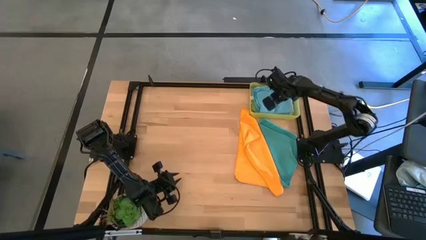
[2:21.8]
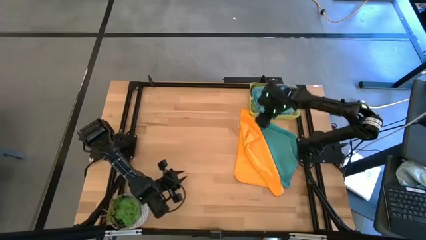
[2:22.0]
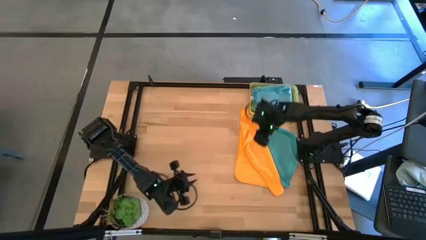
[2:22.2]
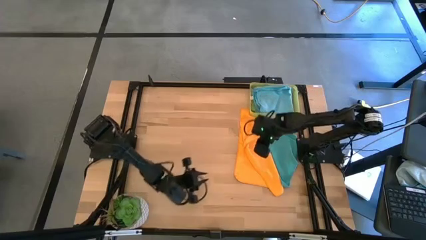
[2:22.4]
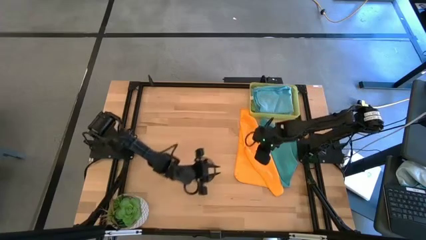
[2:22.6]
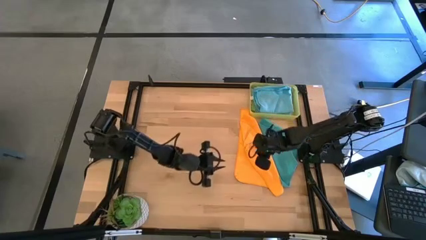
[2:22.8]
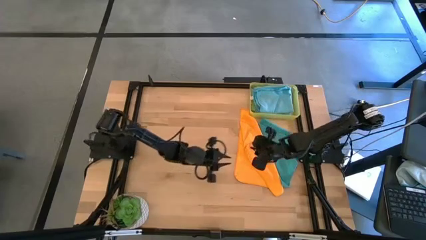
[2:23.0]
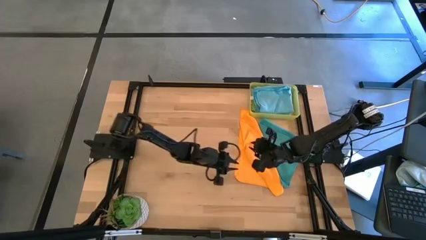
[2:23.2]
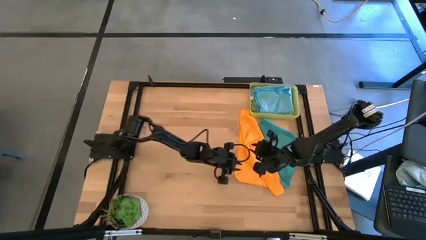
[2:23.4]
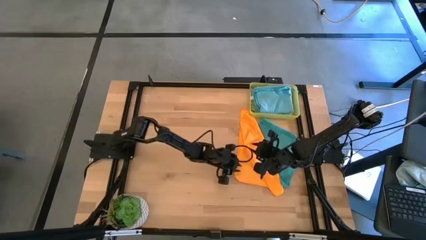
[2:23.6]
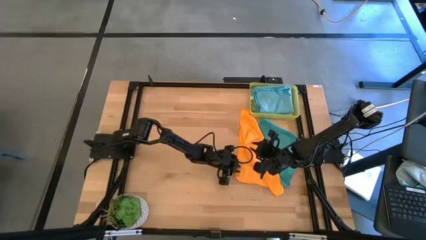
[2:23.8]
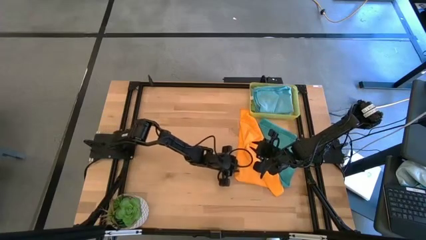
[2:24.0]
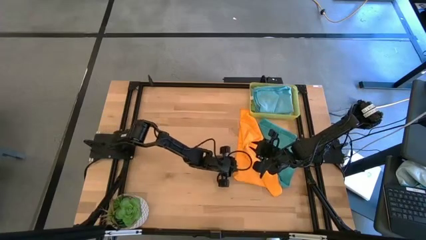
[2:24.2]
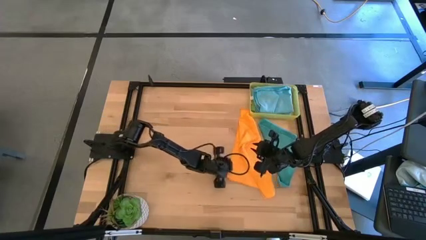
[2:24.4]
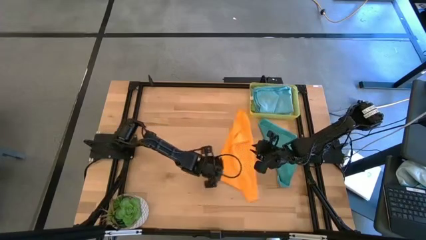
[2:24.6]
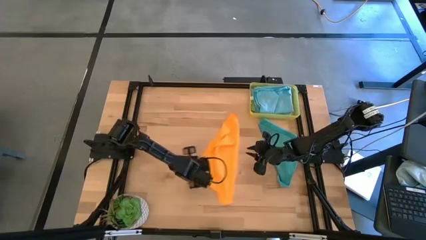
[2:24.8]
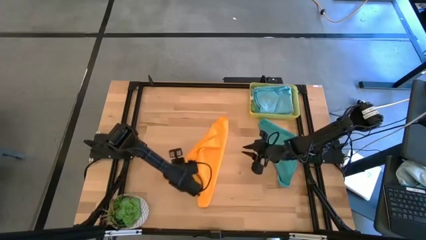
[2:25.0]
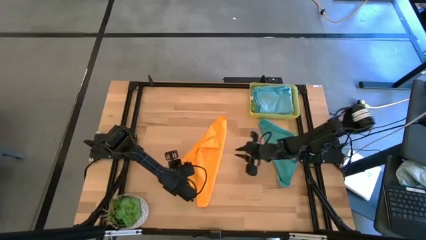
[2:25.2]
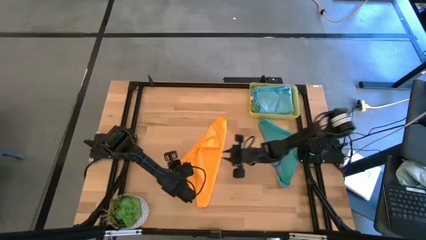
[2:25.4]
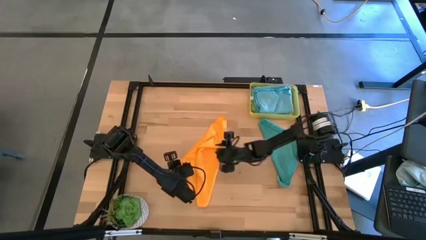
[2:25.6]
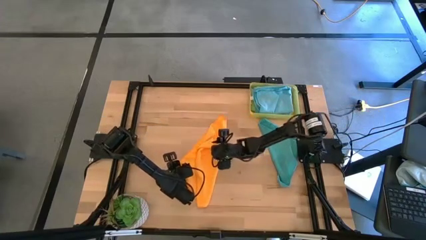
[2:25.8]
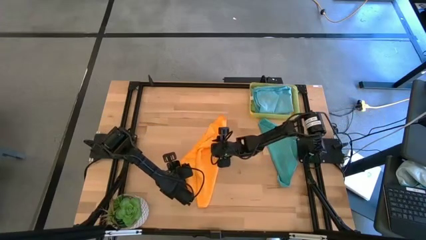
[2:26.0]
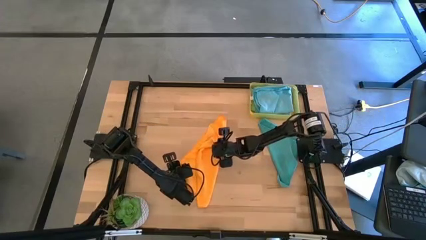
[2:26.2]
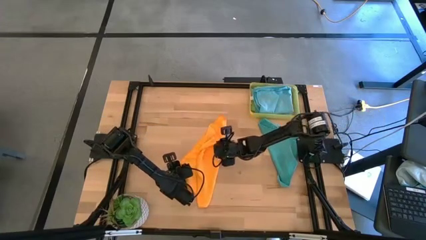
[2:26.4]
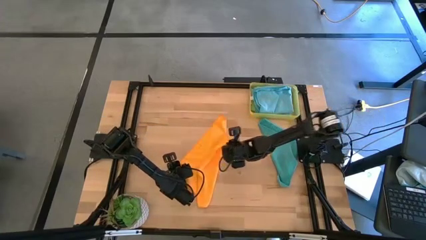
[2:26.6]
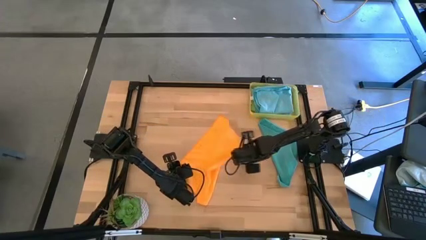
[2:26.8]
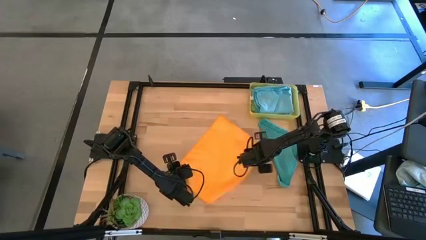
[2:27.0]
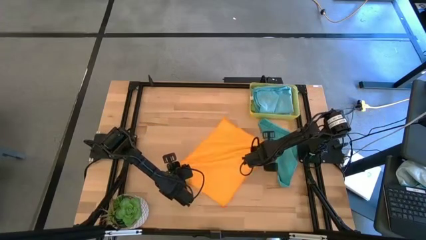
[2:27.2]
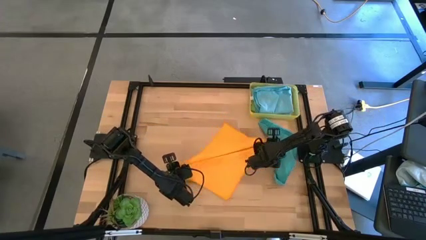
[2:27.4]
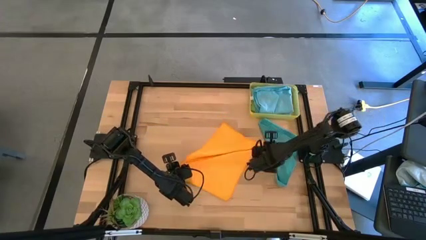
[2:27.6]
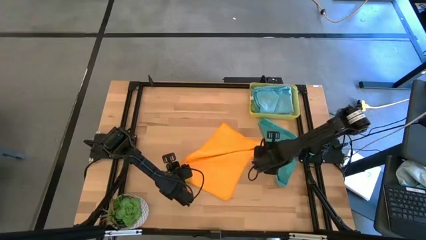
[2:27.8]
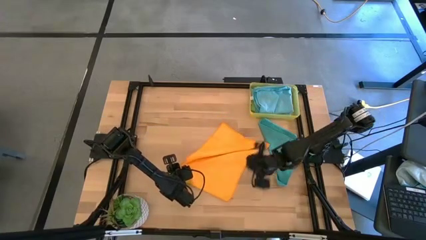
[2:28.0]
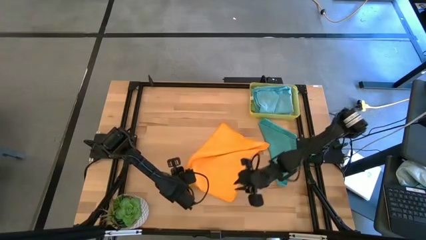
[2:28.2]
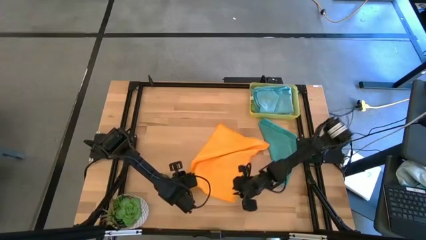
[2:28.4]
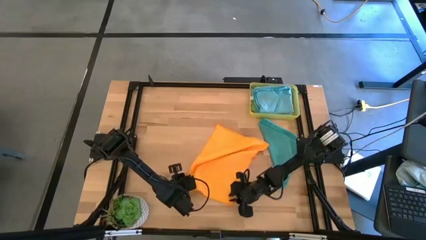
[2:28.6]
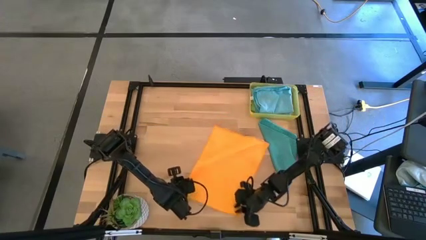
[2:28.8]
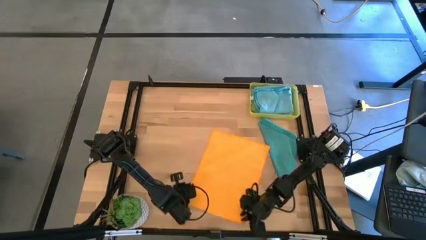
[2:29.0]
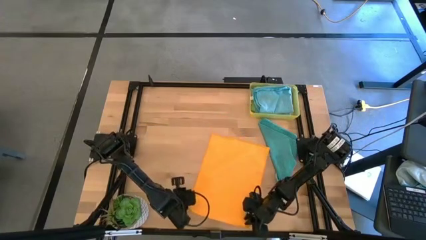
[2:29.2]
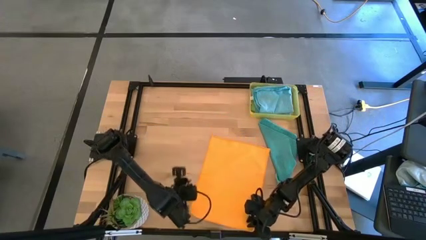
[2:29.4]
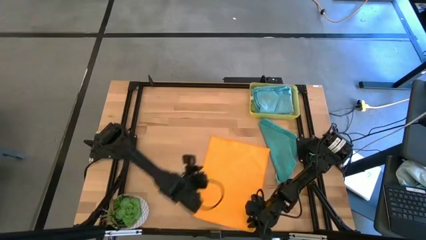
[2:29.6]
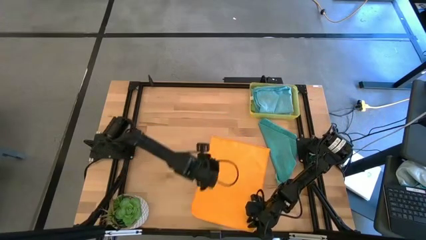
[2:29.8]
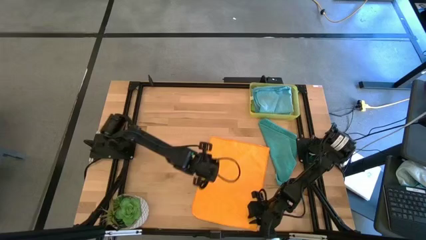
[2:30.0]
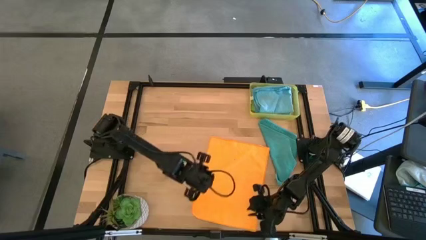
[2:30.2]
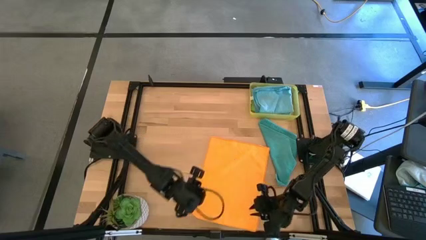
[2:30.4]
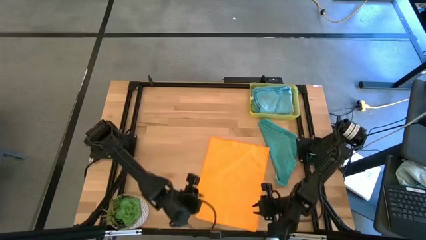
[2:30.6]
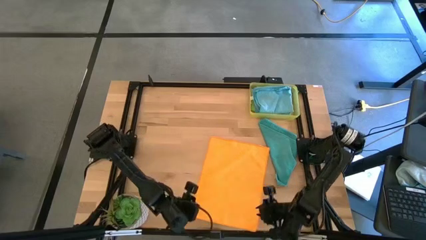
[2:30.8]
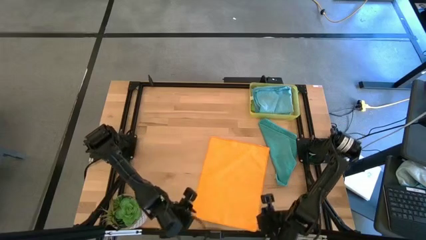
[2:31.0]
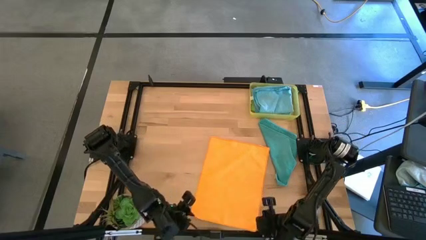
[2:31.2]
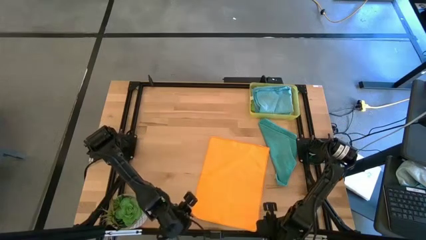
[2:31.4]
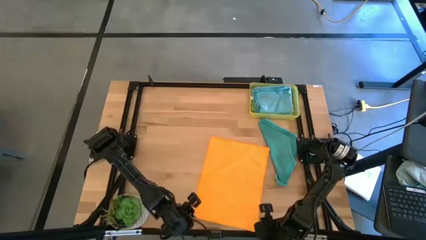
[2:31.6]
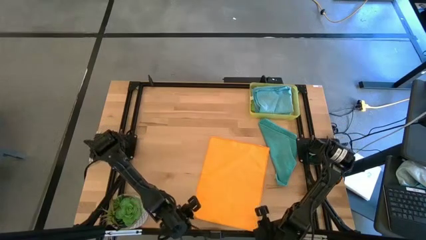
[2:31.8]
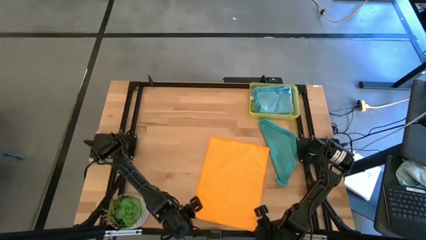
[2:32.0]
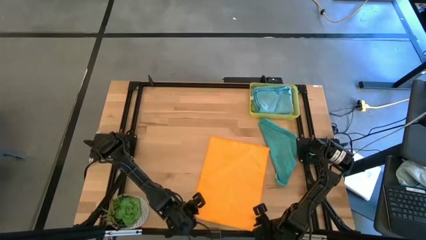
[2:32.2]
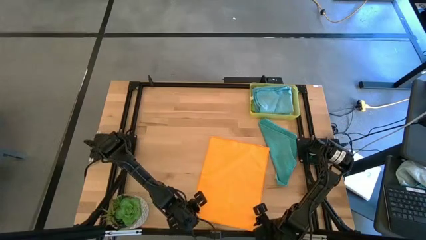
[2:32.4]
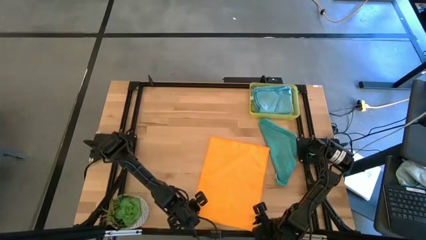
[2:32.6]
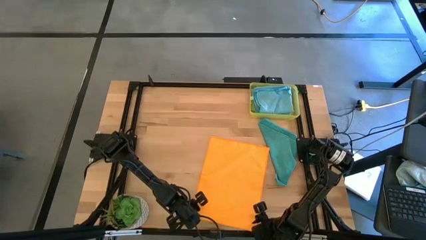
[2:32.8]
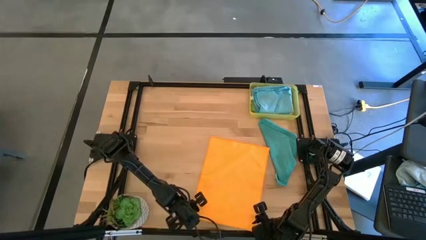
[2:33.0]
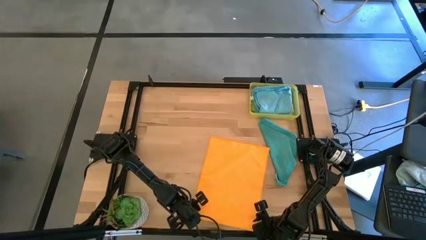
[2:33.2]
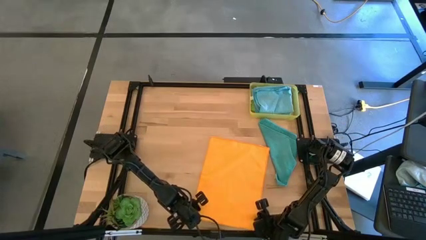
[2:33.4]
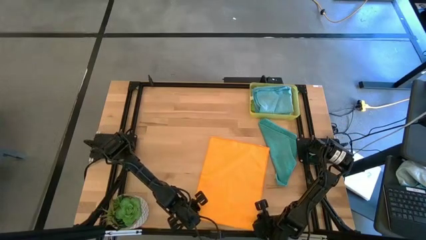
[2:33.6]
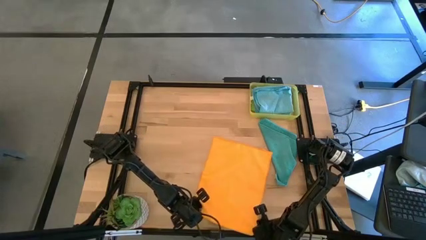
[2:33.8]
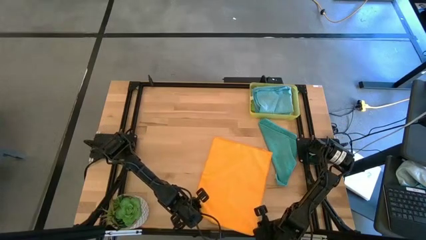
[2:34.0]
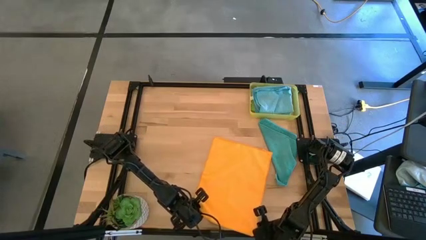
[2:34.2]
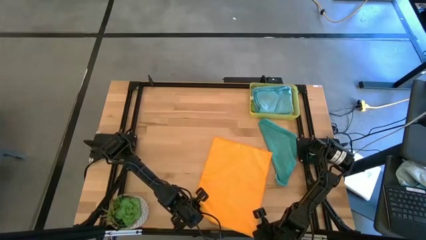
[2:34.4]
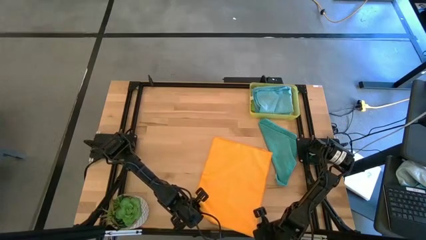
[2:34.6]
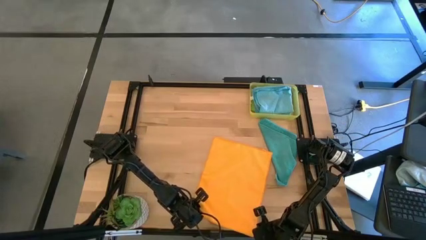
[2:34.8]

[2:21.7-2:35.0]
Task: Fold microfiber towels
Fold the yellow microfiber cloth

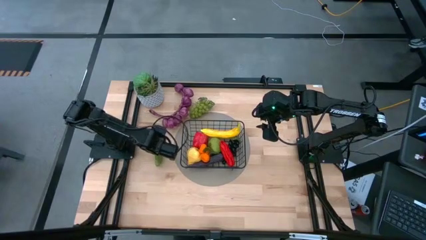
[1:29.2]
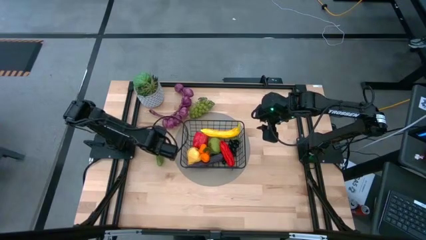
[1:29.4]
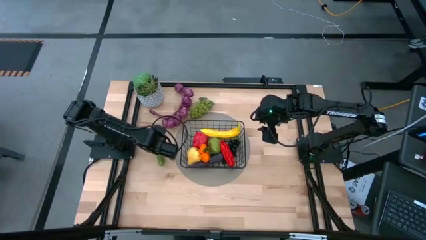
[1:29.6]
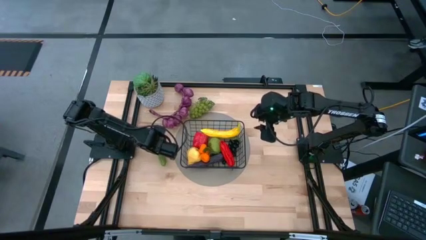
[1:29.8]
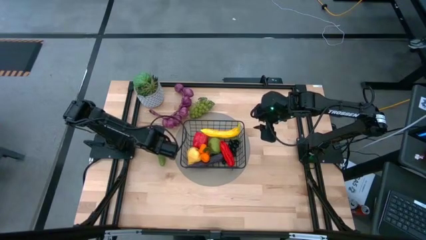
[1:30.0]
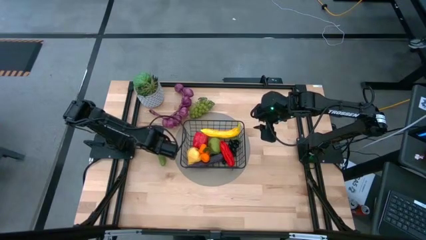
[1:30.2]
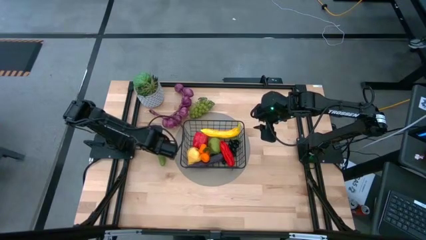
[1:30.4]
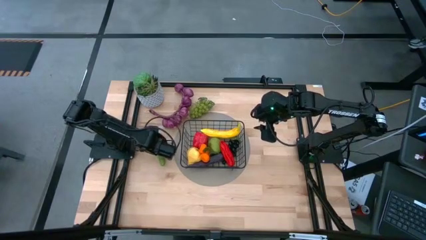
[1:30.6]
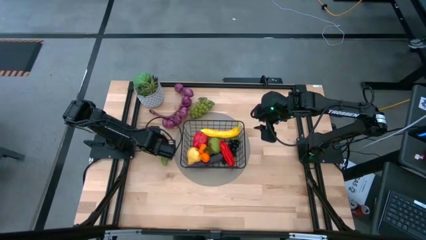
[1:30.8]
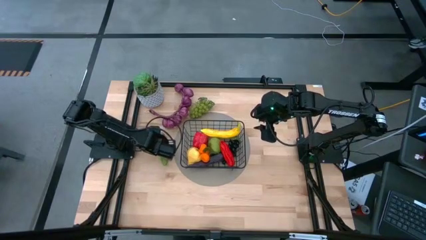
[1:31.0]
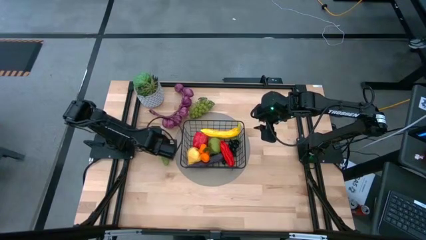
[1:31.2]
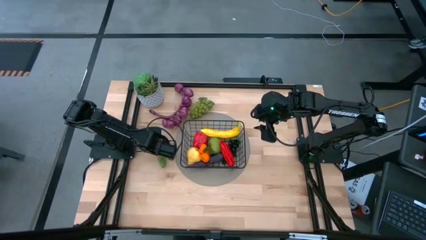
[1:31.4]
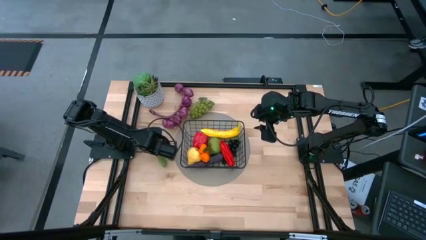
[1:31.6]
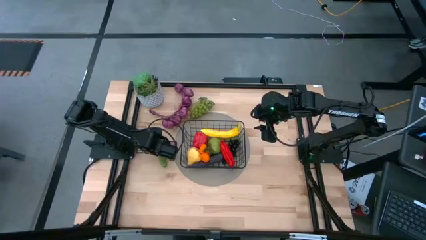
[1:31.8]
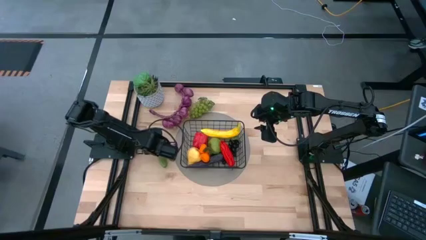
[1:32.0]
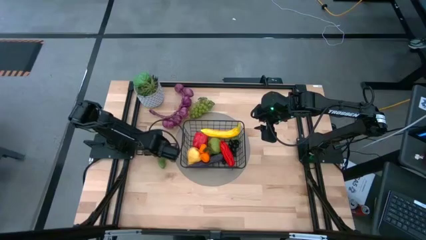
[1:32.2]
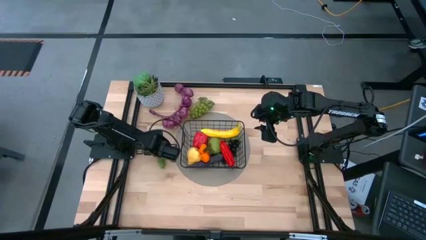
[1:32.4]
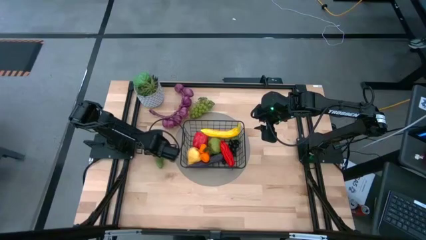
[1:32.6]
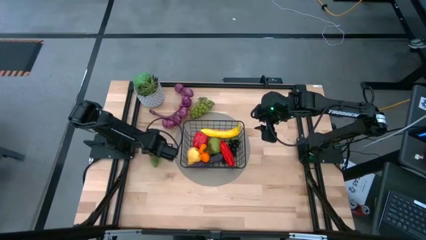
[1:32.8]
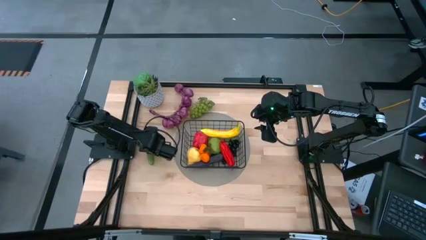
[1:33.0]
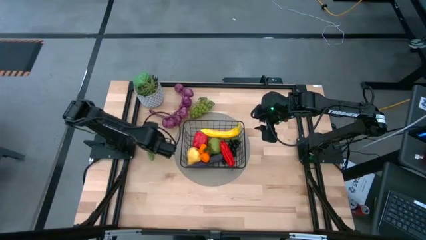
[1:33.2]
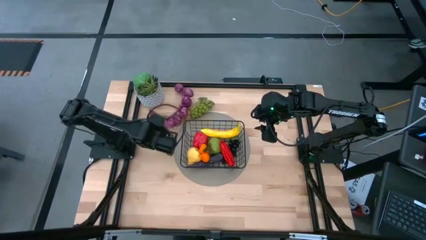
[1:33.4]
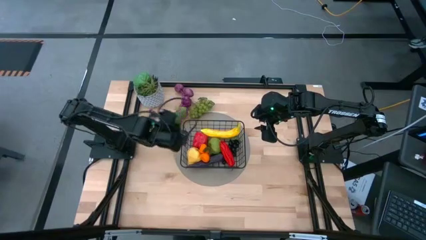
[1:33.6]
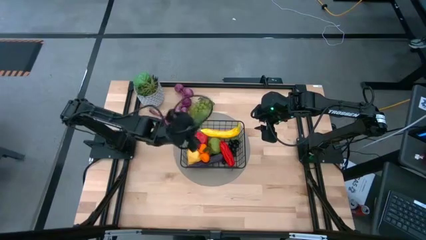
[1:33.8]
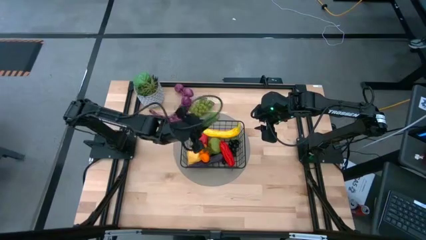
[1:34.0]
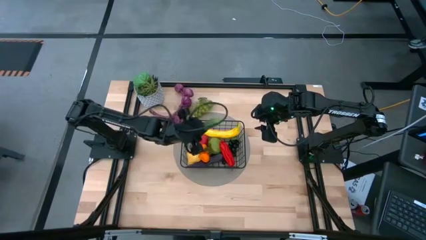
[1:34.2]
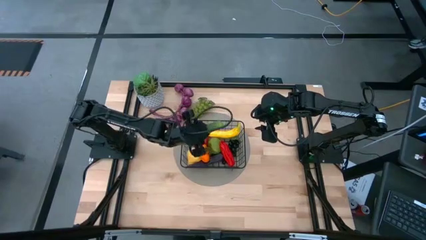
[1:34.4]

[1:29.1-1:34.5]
Task: Build produce basket
Put the cucumber into the black wire basket
